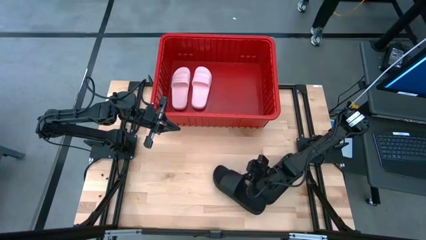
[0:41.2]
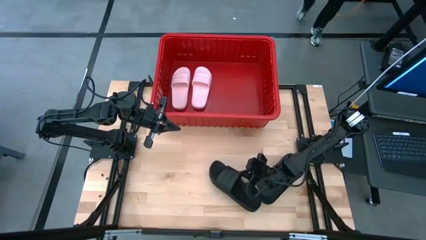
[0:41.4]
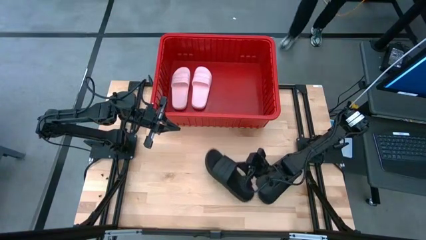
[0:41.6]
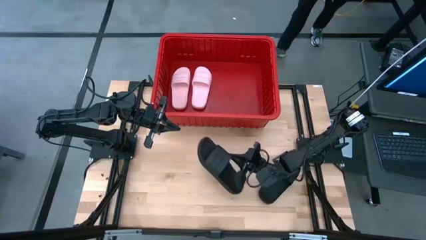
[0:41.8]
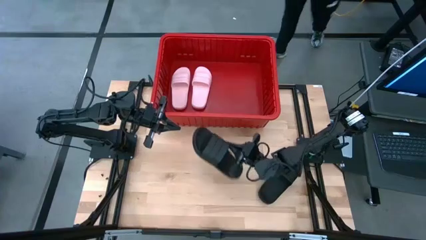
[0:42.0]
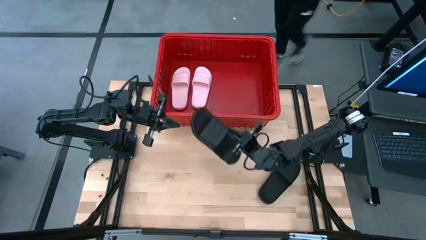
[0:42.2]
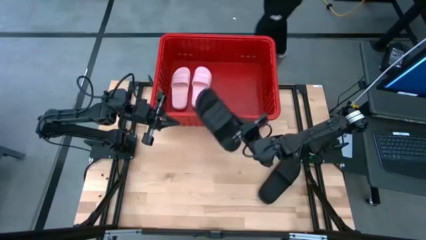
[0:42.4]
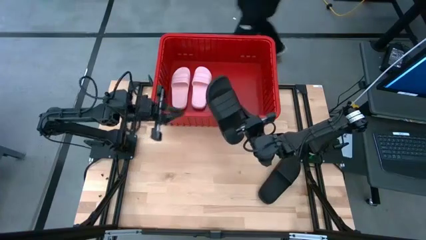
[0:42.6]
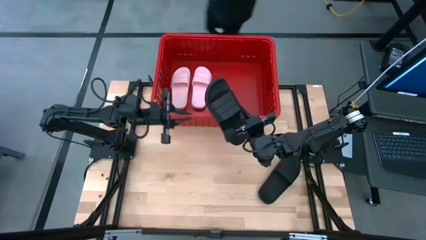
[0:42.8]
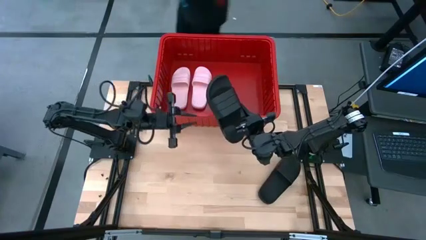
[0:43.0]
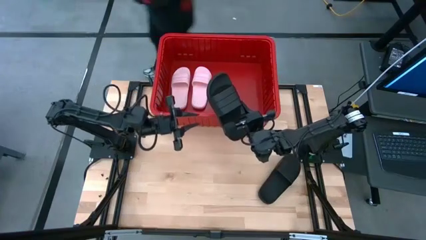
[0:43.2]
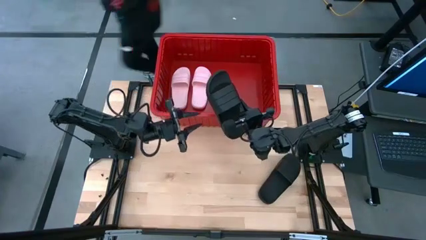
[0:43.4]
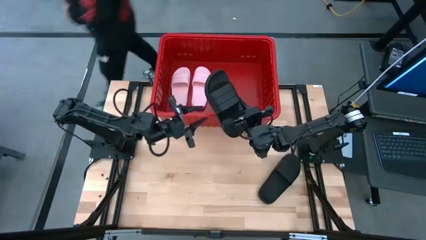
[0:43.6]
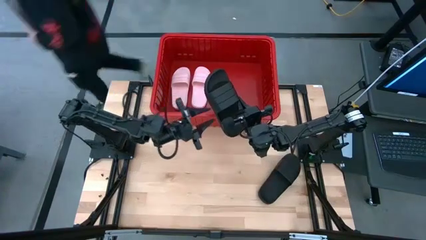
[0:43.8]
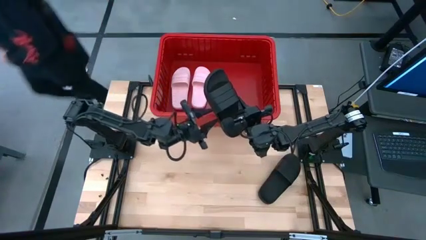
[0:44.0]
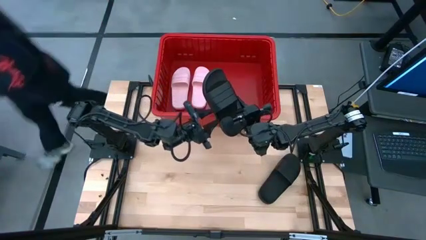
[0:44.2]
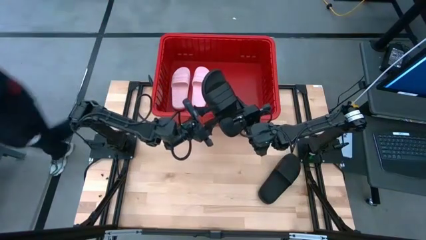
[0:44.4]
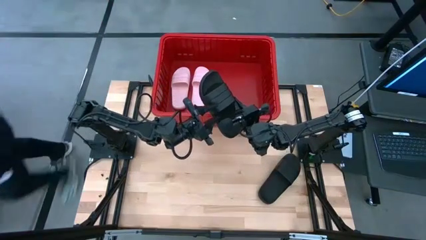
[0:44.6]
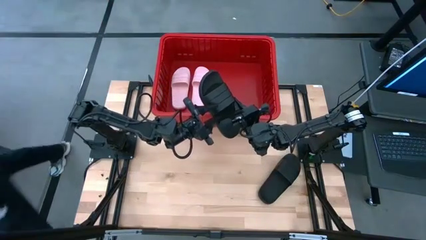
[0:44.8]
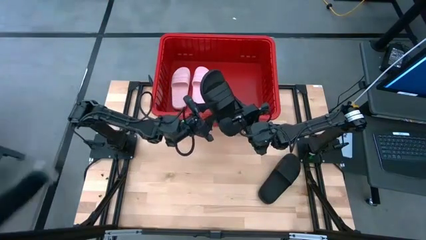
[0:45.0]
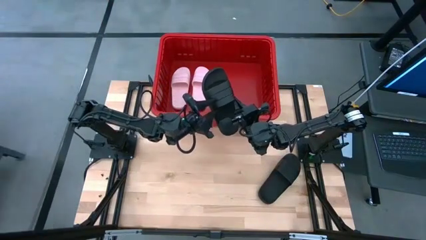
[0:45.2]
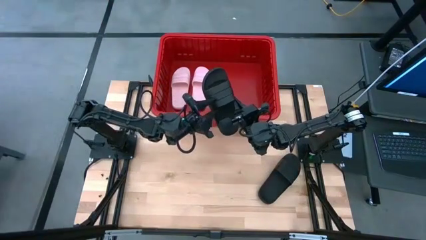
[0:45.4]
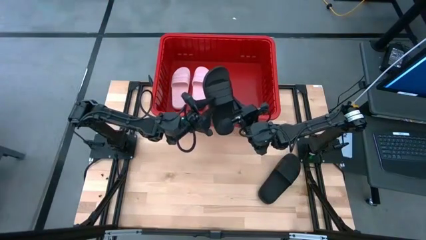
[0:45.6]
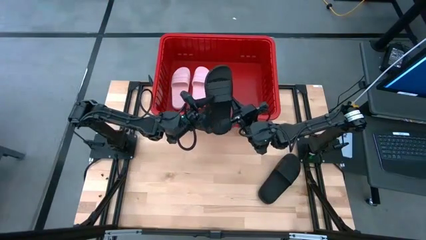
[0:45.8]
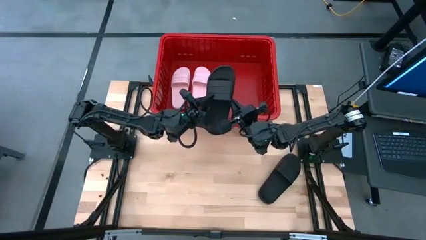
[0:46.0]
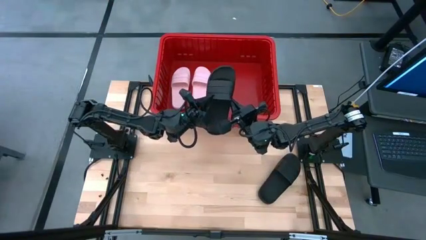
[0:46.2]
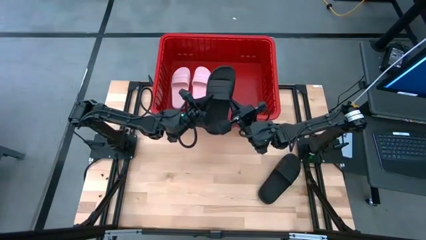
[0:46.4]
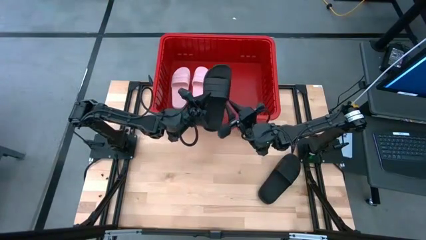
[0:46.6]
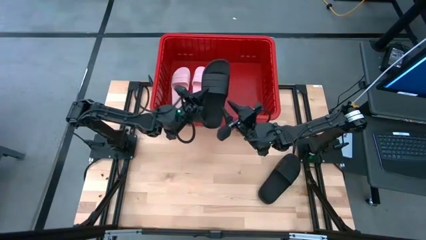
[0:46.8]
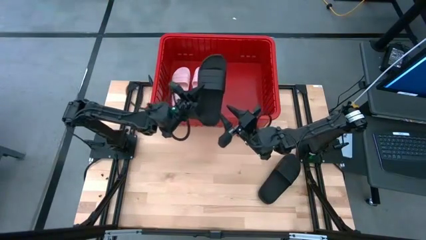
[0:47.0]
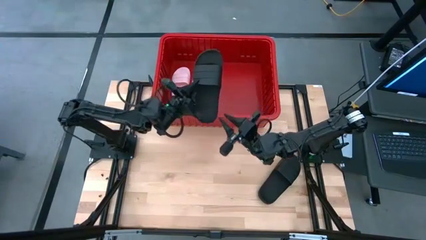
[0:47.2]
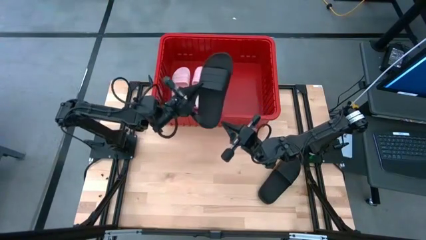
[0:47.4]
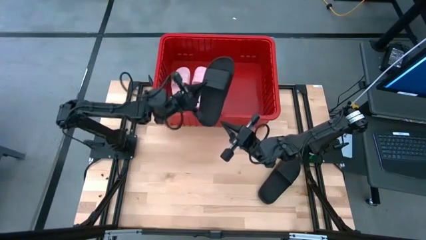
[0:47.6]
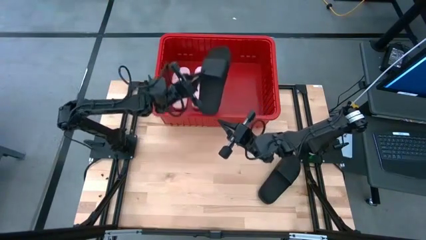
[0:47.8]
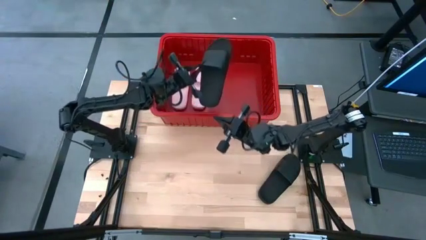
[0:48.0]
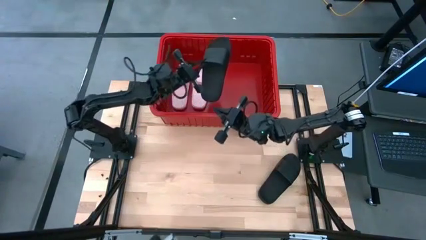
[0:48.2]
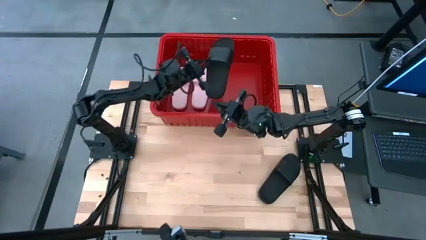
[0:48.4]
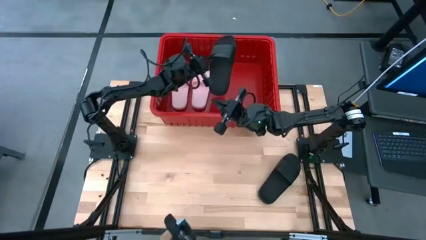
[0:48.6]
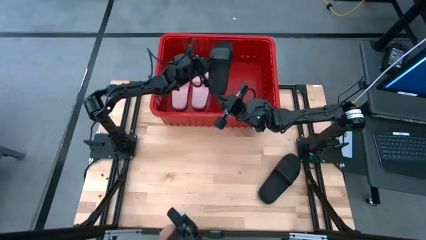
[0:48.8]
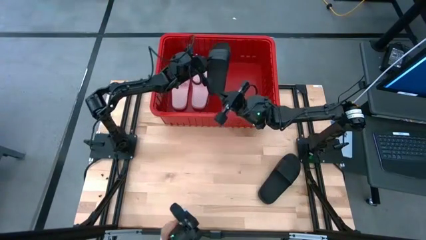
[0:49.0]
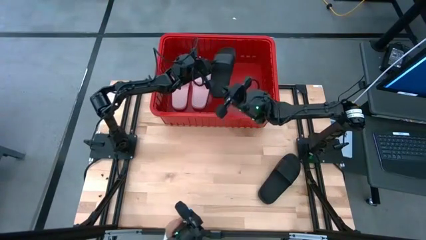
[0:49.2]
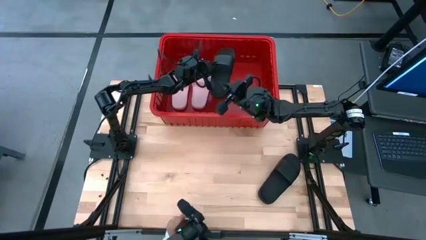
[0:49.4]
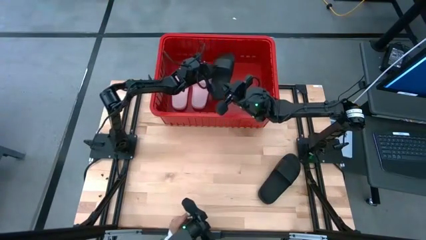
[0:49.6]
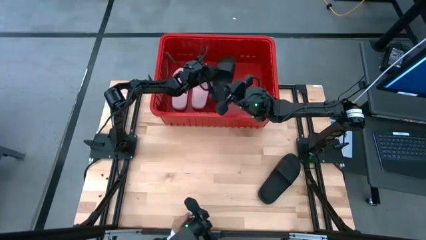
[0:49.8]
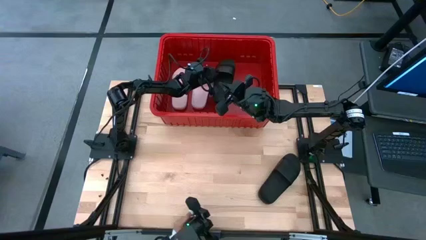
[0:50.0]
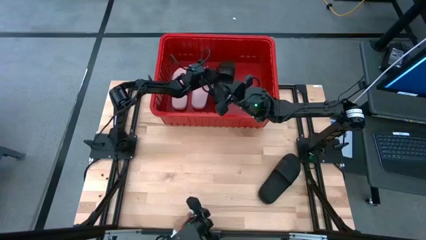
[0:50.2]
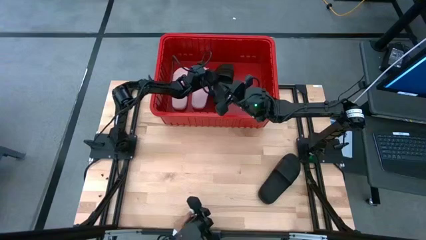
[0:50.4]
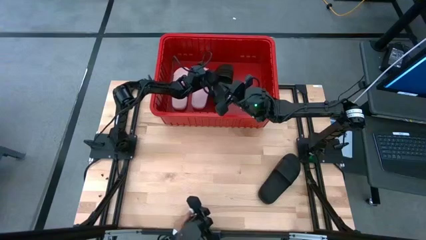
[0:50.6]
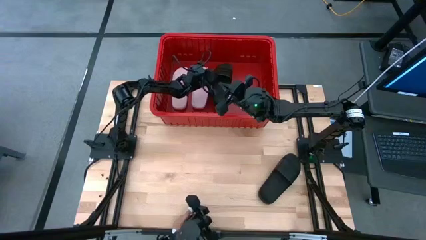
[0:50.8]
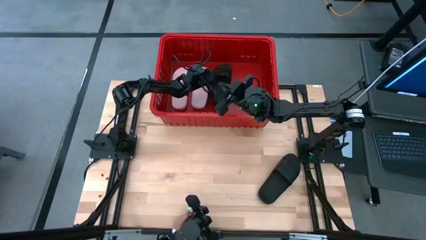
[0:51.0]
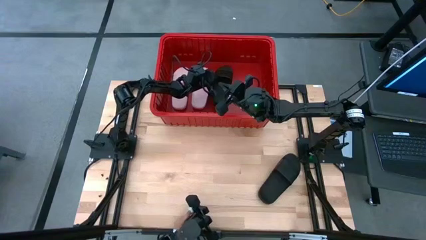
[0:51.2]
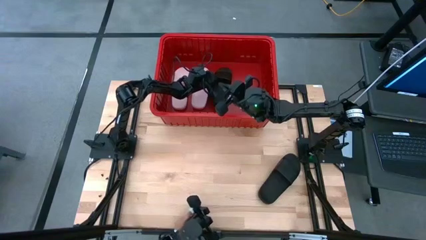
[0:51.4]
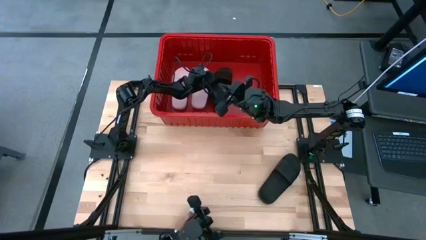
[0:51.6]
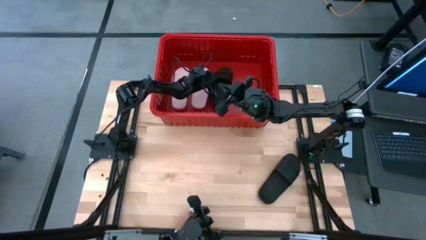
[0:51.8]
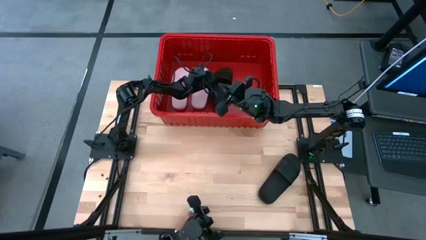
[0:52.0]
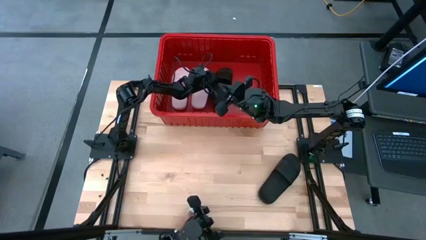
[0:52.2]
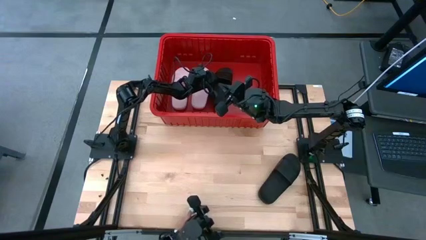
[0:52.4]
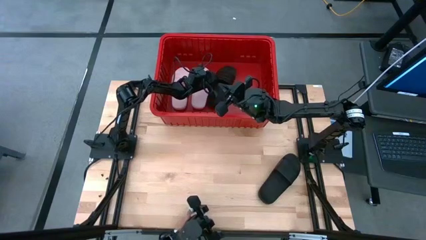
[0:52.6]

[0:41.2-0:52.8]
Task: Pick and place slides into bin
Put the left black slide into the red bin
